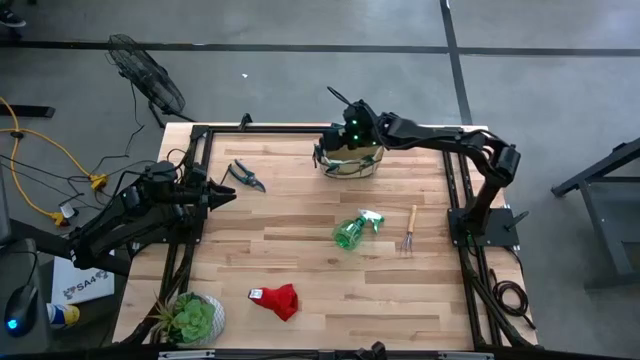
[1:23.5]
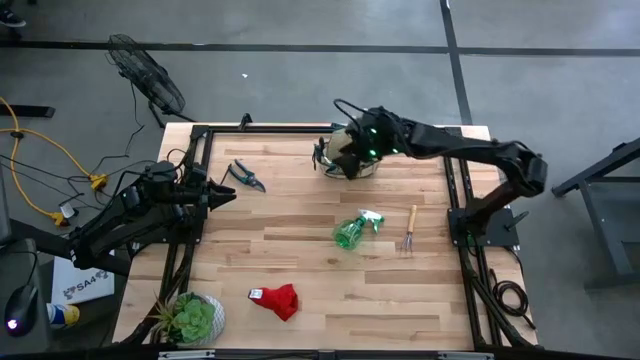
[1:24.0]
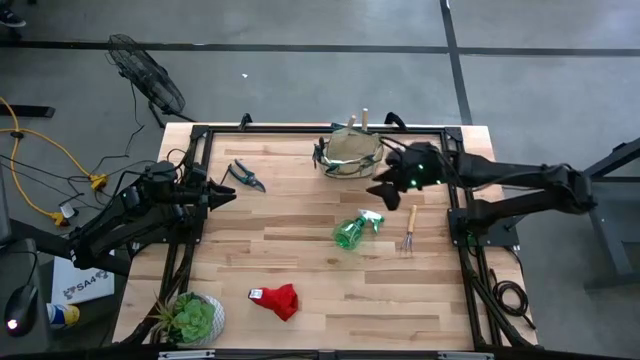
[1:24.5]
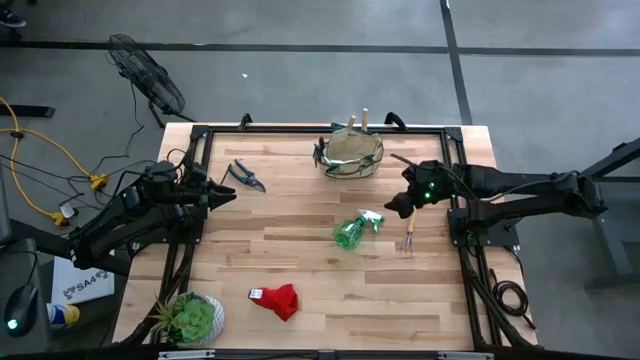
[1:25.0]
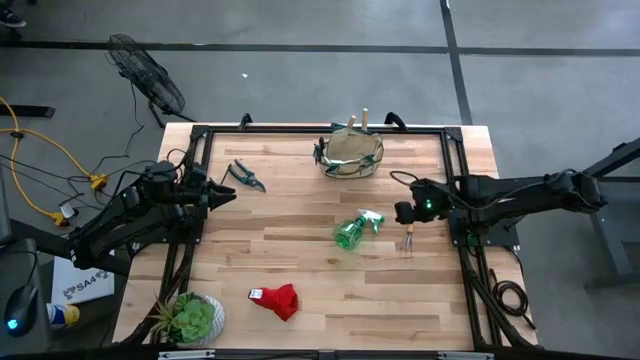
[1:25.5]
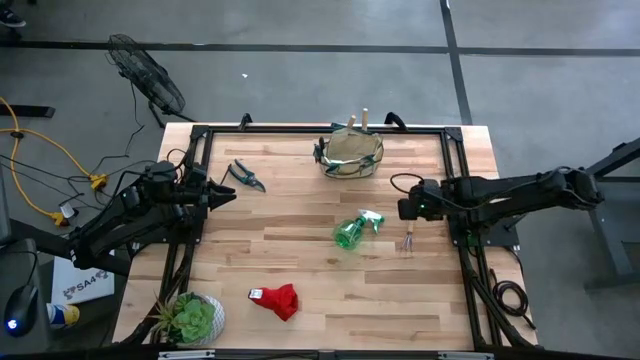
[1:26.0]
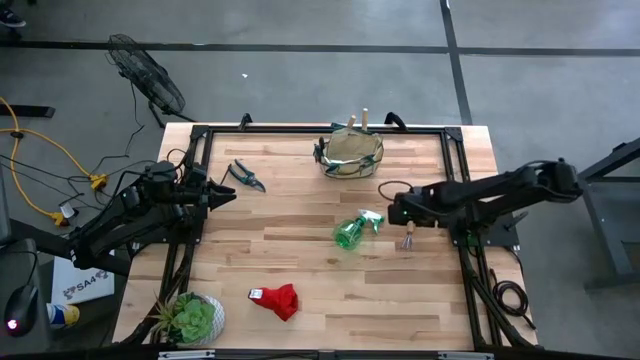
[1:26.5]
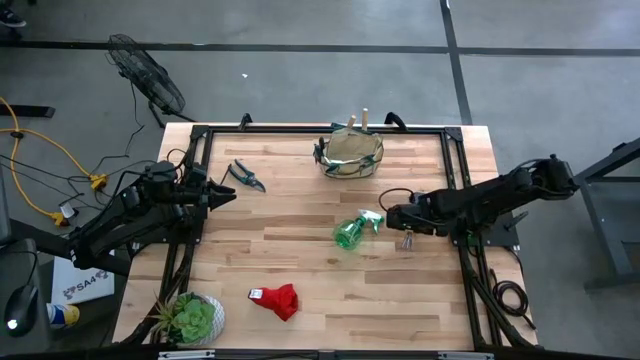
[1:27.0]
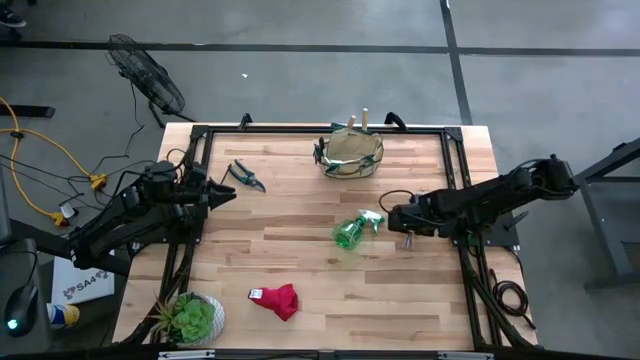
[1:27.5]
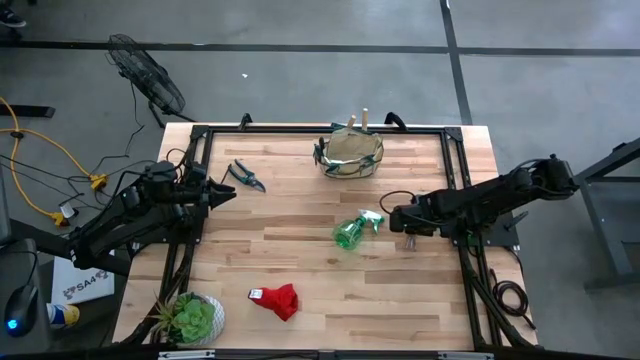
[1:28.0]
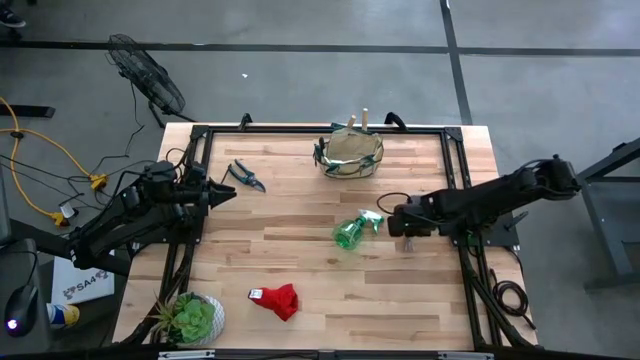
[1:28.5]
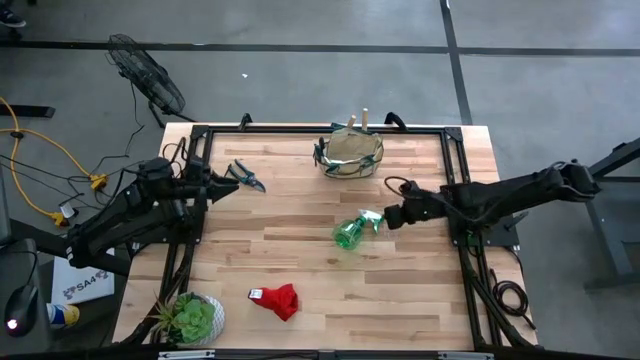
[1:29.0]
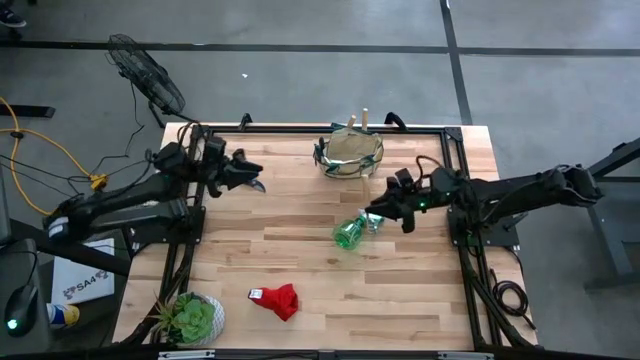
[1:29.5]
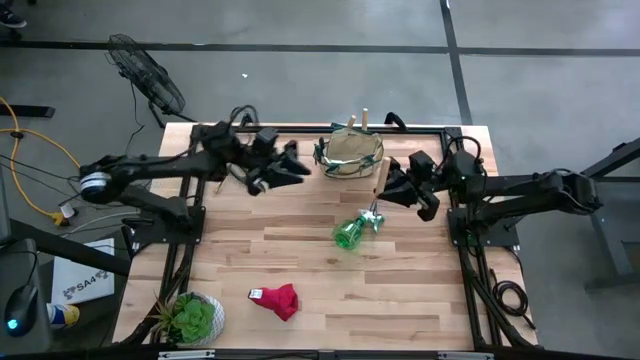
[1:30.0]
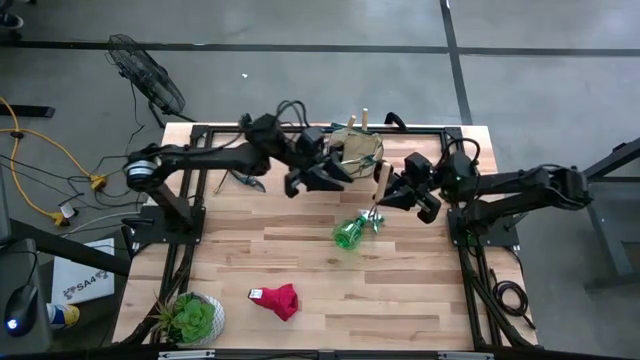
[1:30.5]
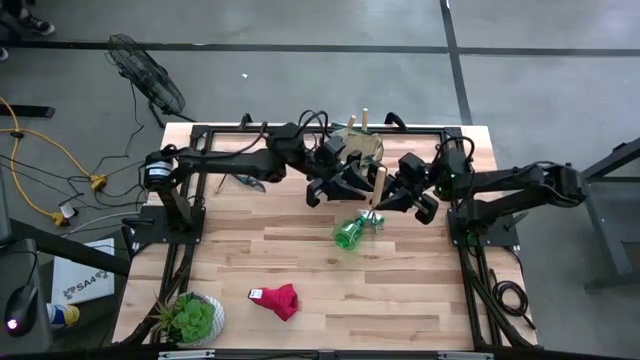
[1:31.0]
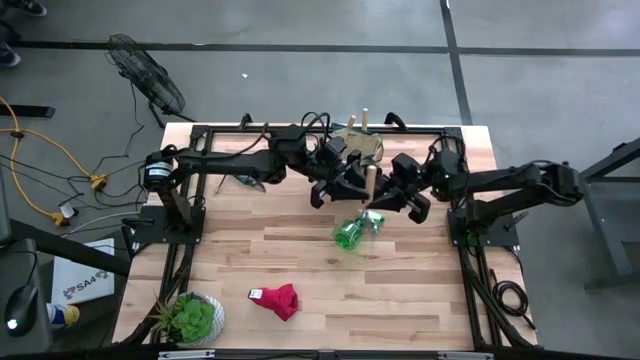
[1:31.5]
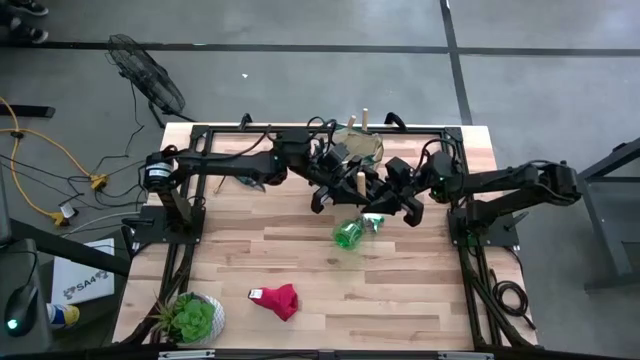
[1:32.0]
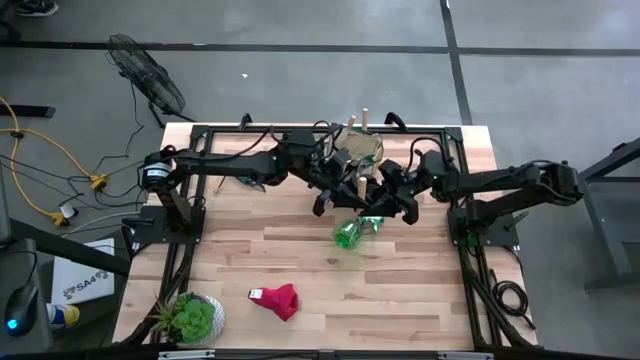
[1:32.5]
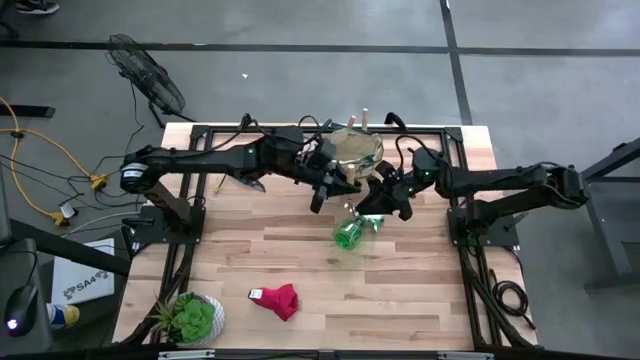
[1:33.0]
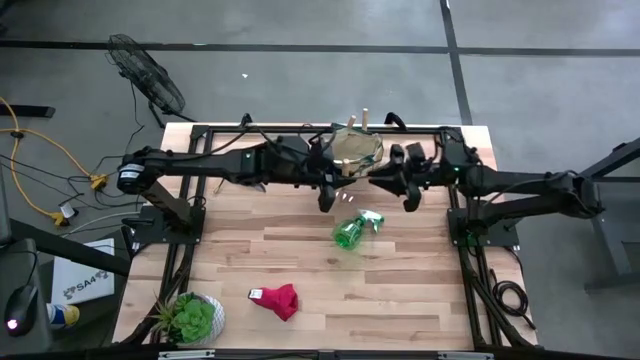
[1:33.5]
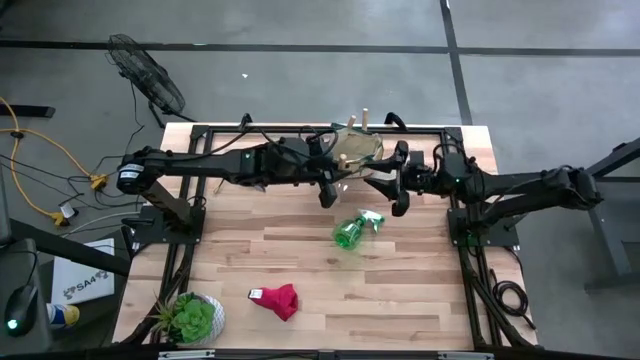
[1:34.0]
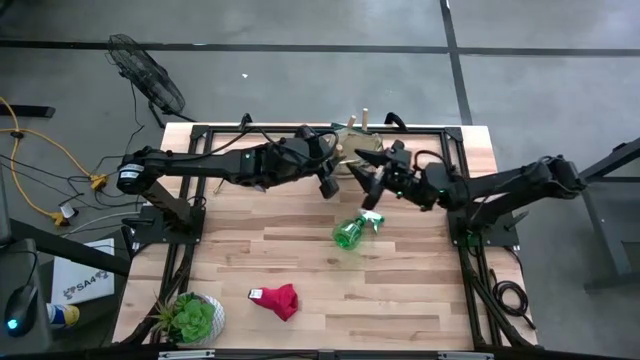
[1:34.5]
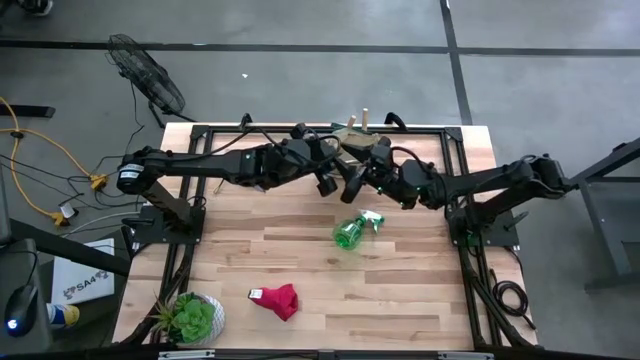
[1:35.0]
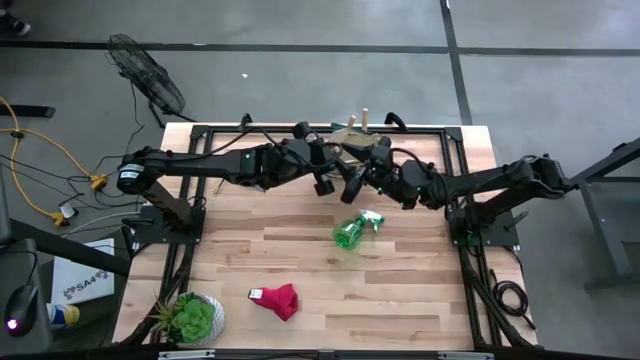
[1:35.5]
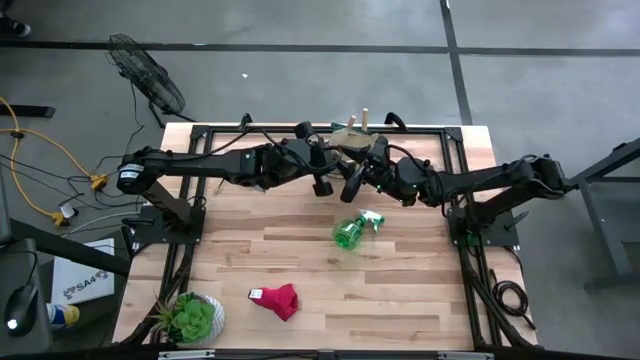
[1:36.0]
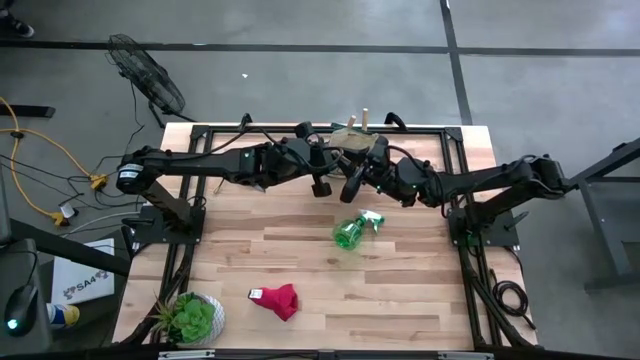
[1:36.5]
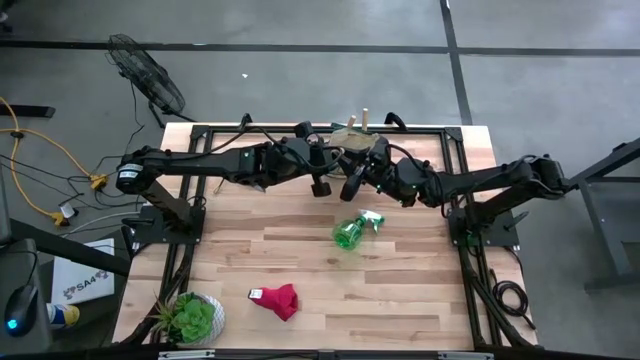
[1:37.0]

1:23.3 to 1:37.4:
Task: Pick & Place Garden tools in Gardening bag
Put the hand rake into the gardening bag

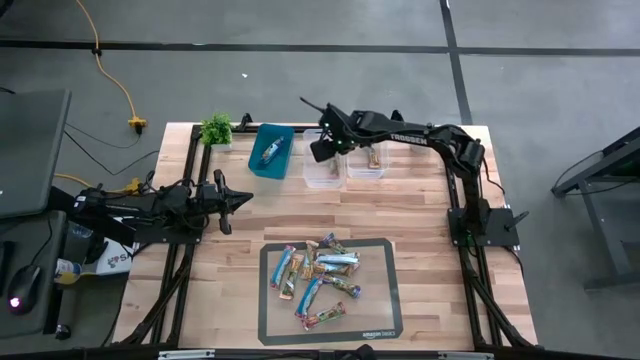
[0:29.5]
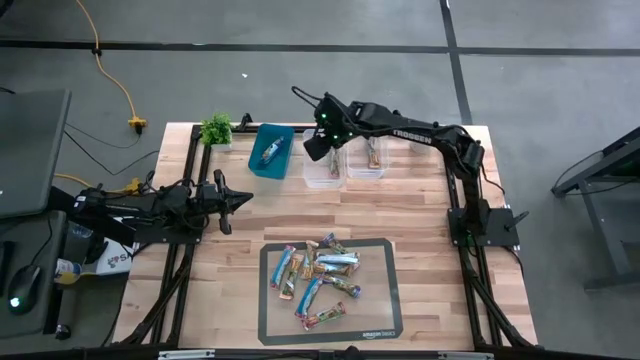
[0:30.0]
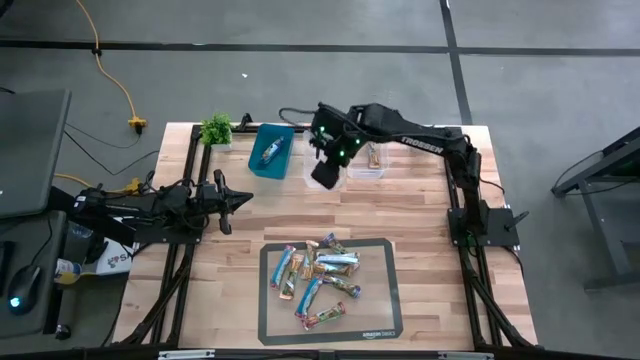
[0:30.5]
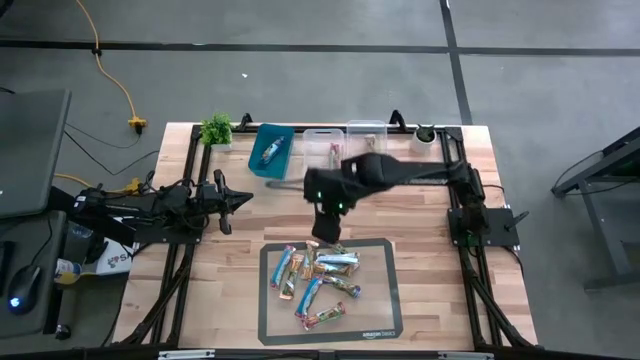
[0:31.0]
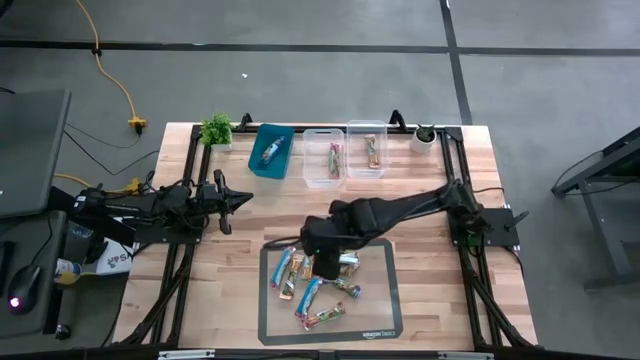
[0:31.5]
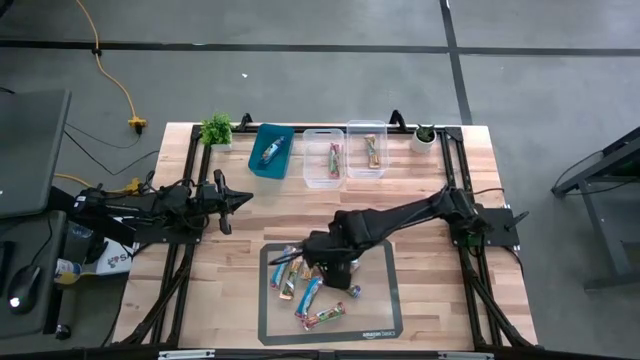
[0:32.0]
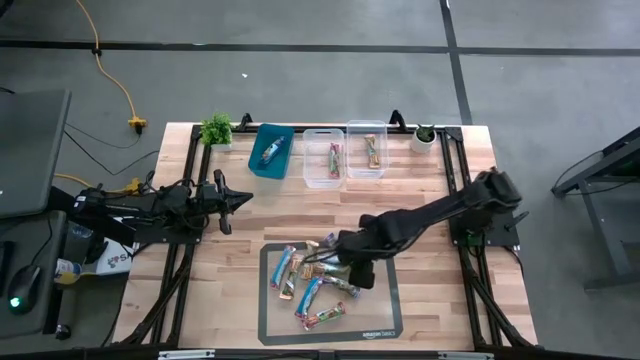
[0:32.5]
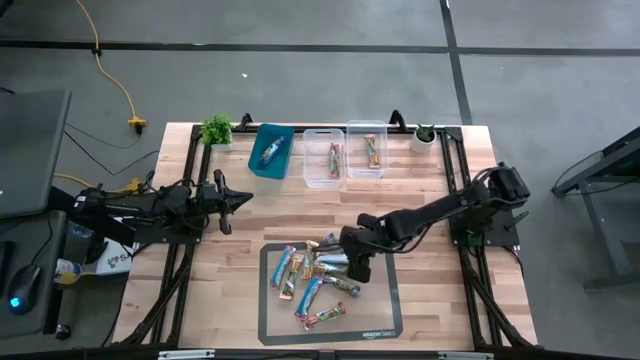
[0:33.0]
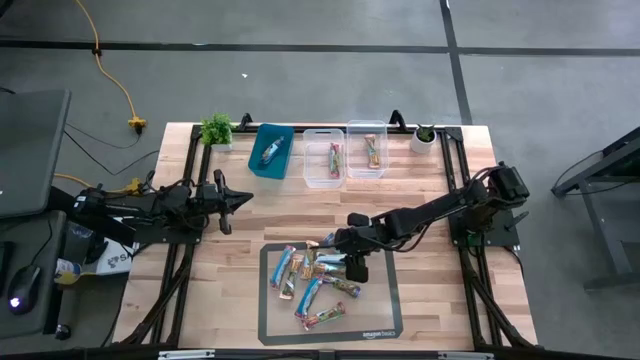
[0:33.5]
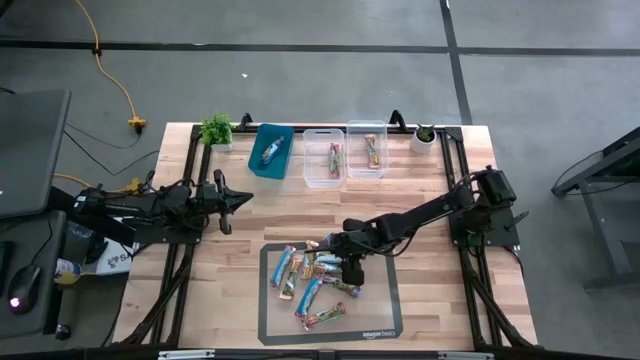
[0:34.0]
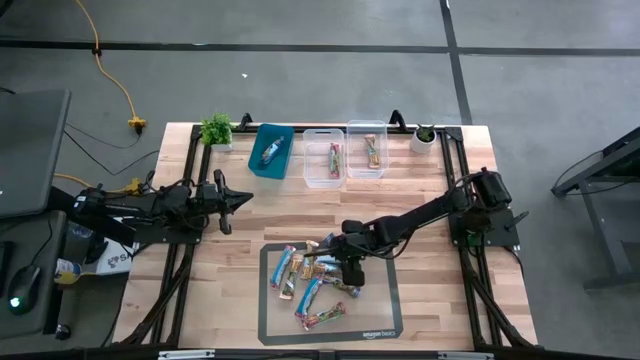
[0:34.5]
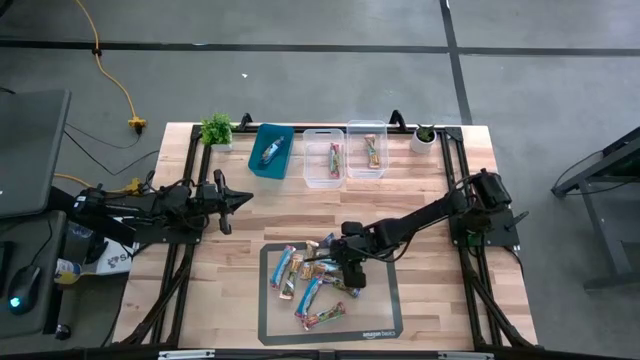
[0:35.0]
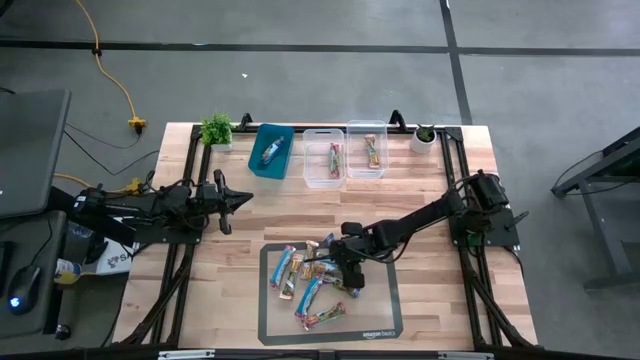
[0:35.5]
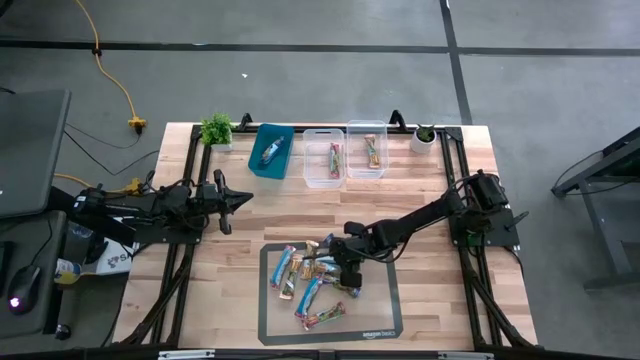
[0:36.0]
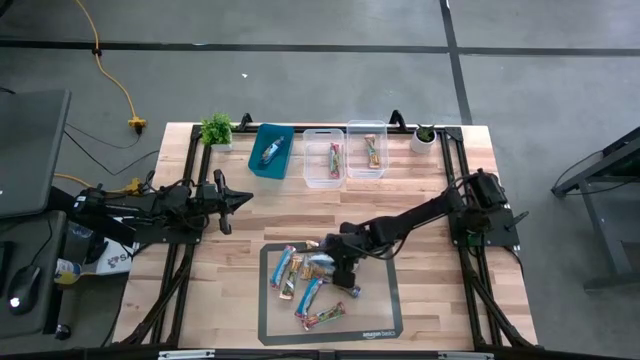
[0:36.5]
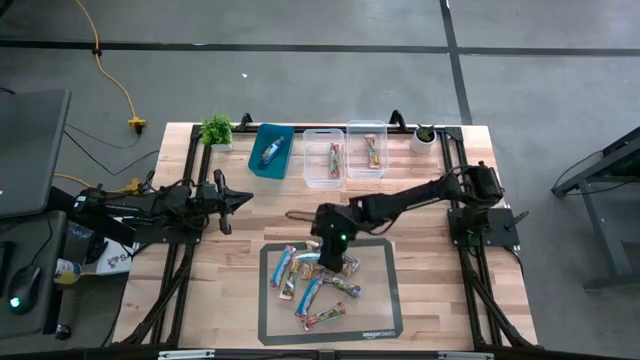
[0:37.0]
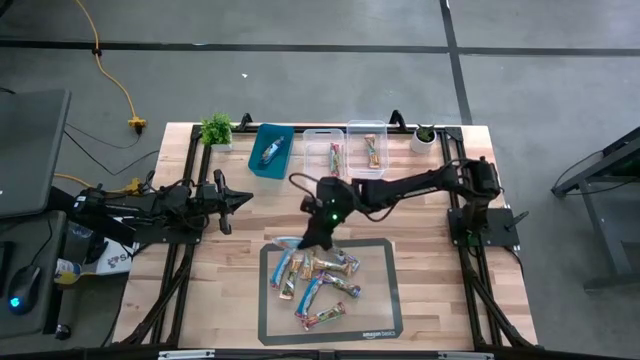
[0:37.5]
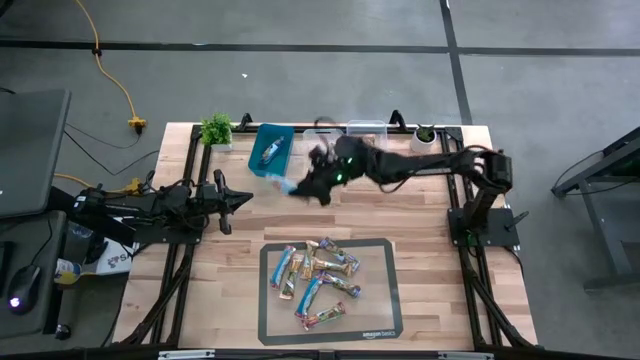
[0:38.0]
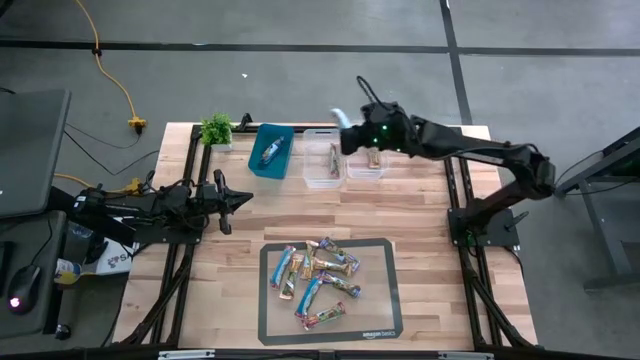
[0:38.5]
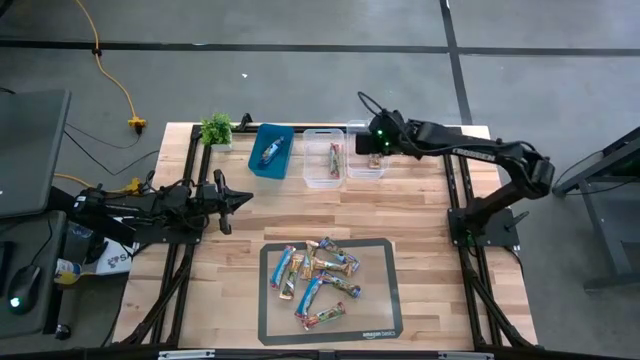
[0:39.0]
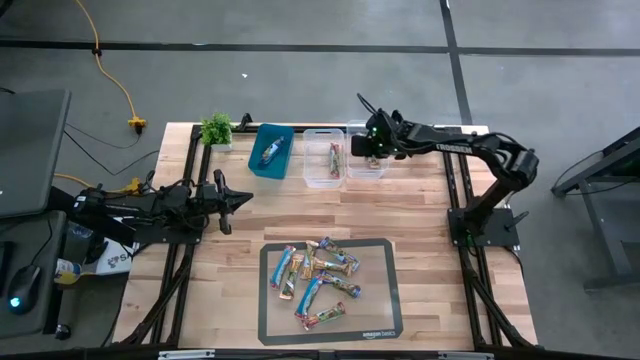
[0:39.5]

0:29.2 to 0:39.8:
Task: Pick and place Granola Bars by type
Put the yellow granola bar into the right transparent bin
